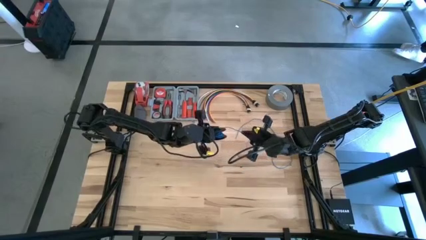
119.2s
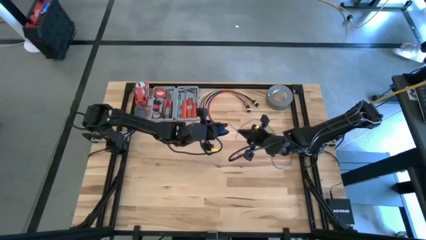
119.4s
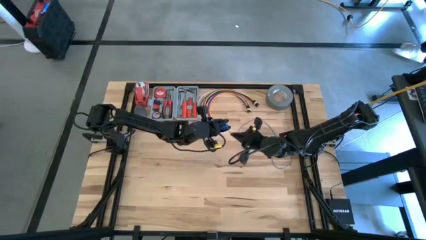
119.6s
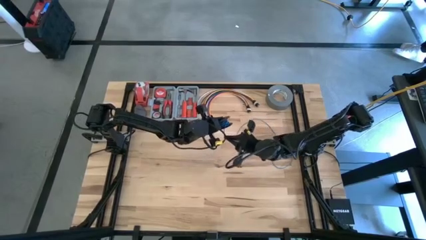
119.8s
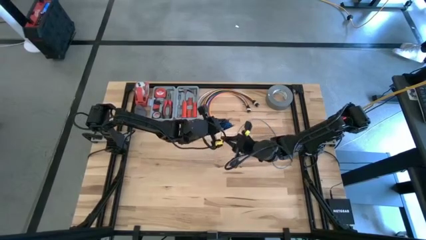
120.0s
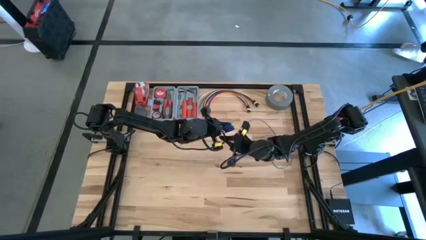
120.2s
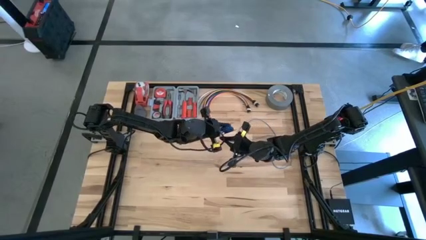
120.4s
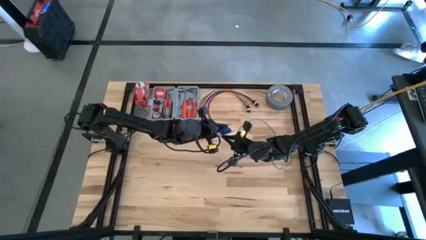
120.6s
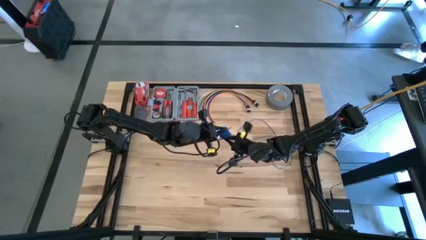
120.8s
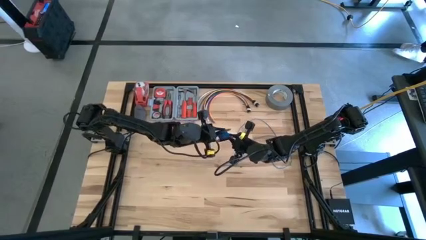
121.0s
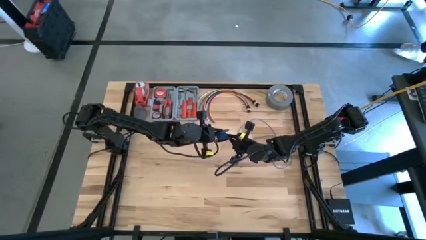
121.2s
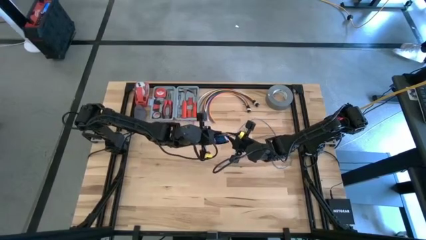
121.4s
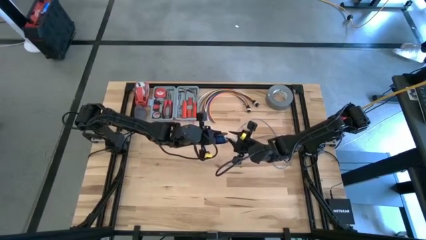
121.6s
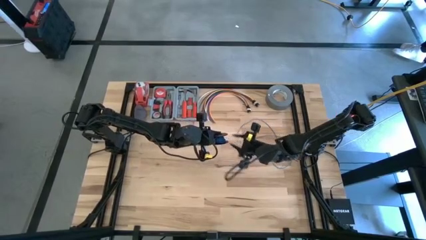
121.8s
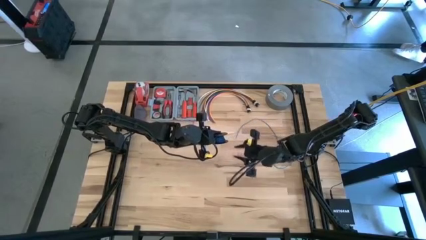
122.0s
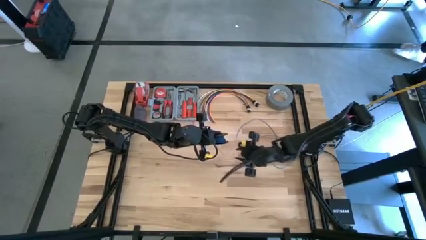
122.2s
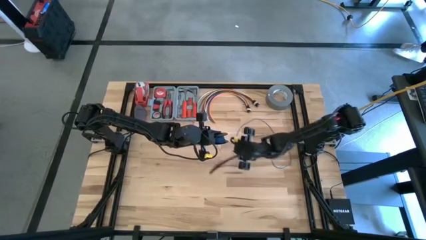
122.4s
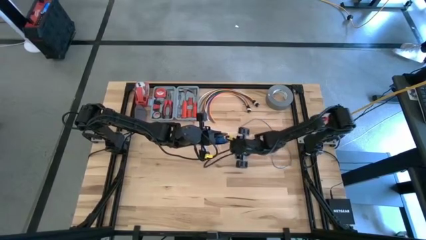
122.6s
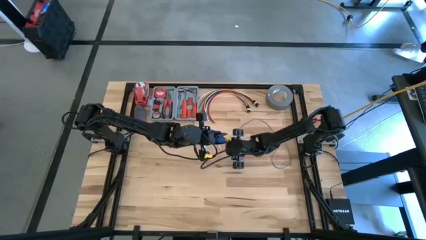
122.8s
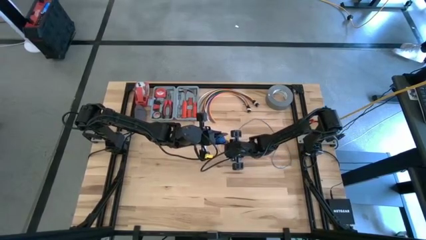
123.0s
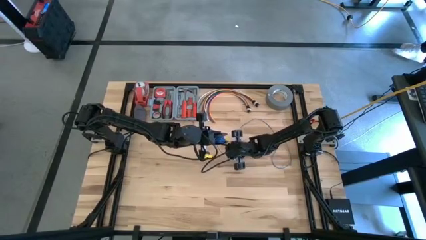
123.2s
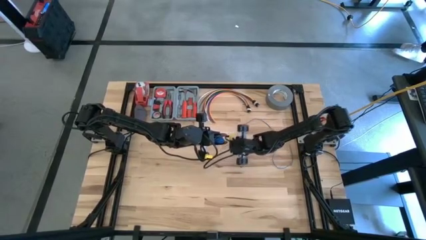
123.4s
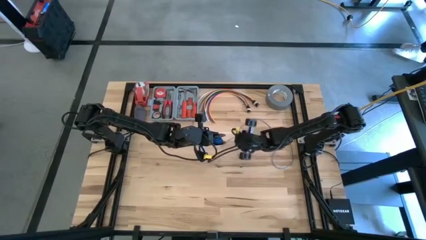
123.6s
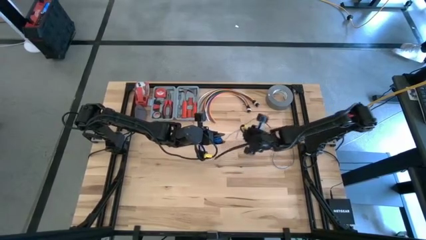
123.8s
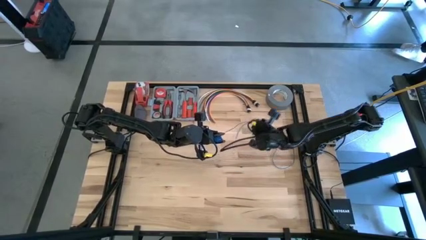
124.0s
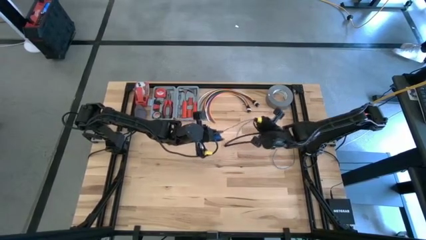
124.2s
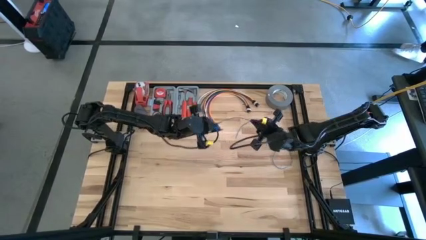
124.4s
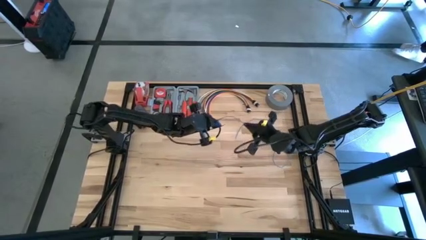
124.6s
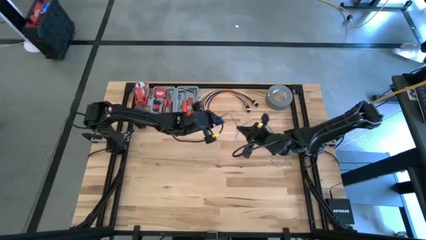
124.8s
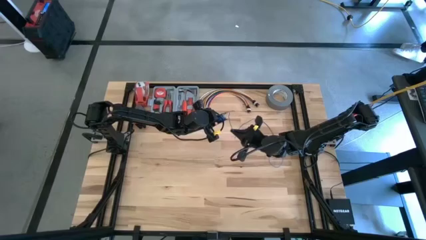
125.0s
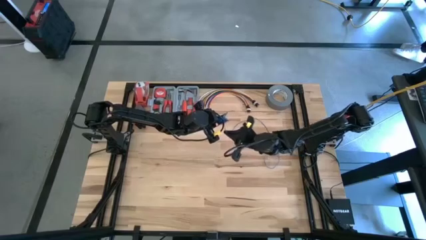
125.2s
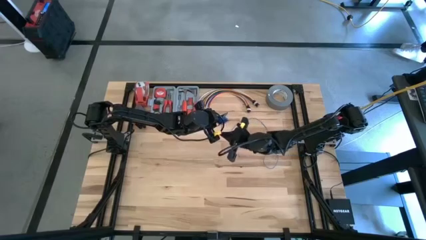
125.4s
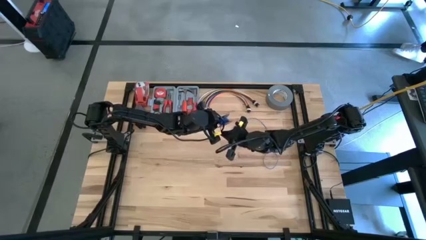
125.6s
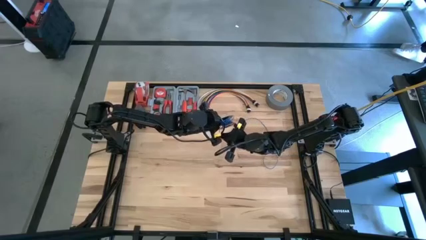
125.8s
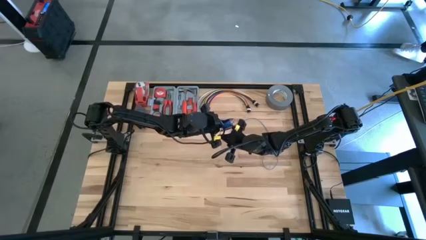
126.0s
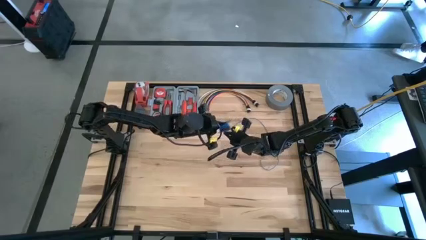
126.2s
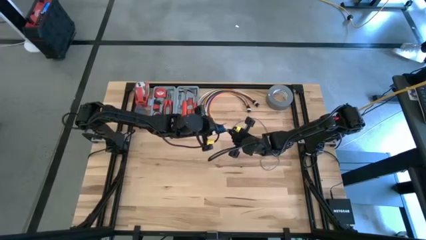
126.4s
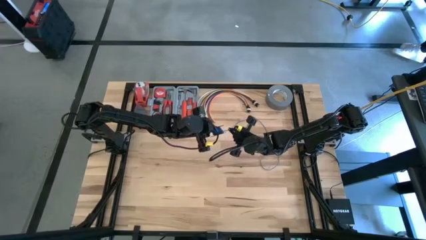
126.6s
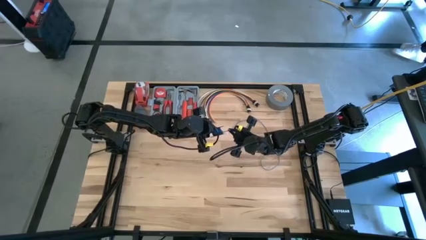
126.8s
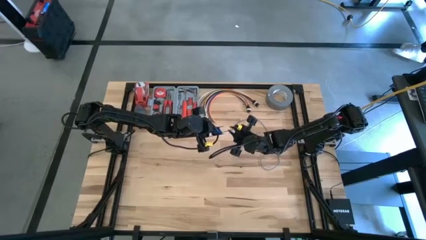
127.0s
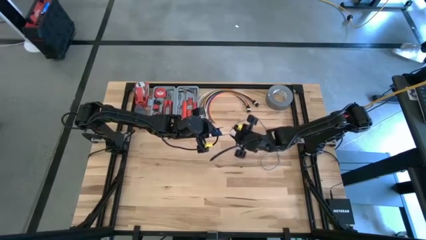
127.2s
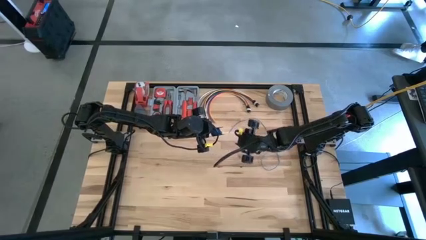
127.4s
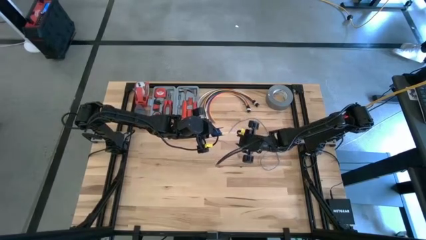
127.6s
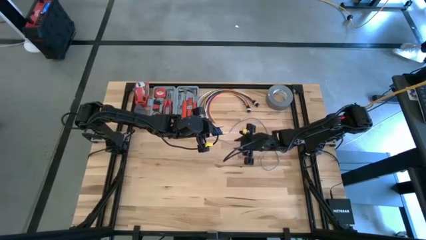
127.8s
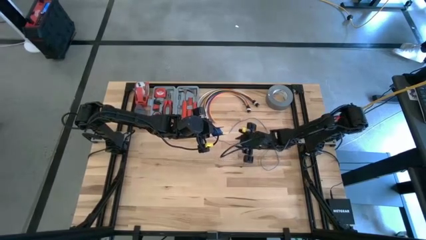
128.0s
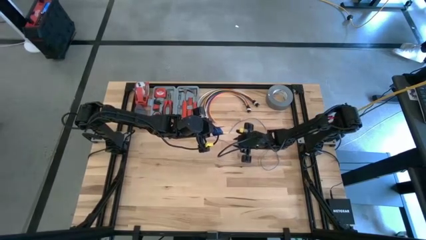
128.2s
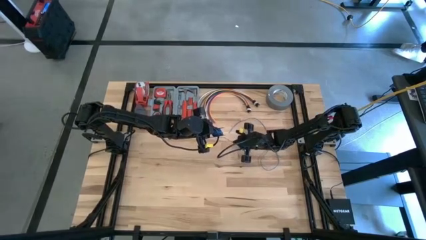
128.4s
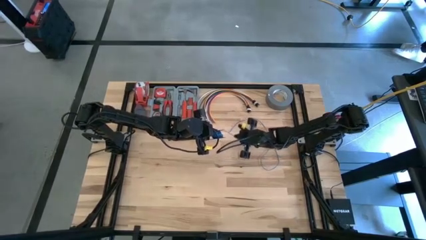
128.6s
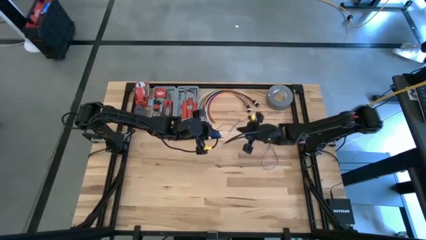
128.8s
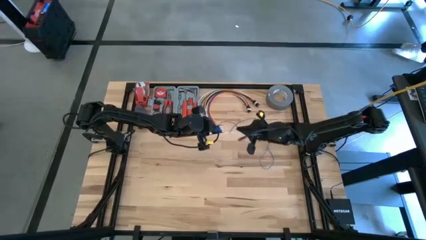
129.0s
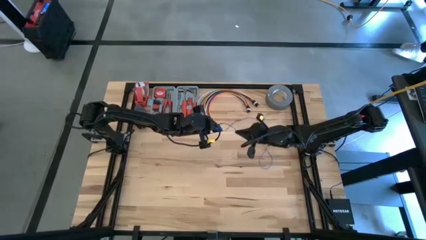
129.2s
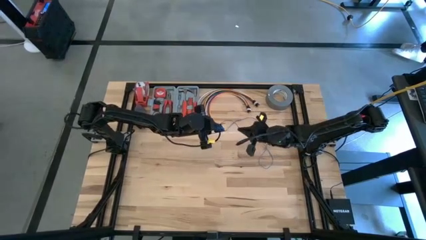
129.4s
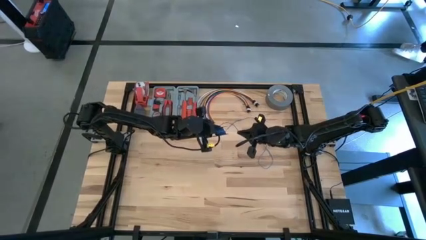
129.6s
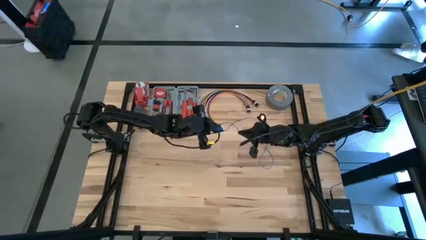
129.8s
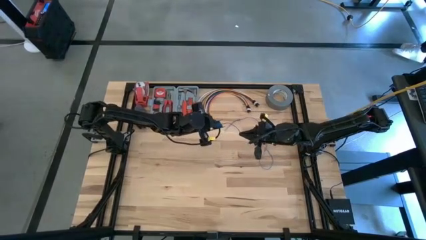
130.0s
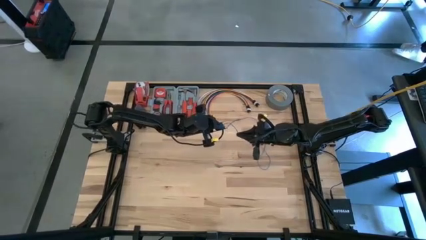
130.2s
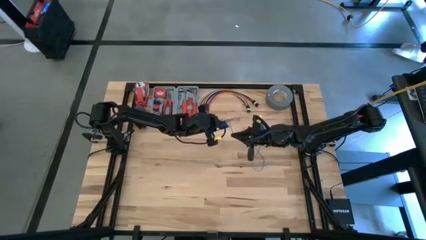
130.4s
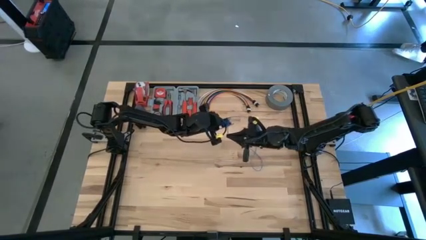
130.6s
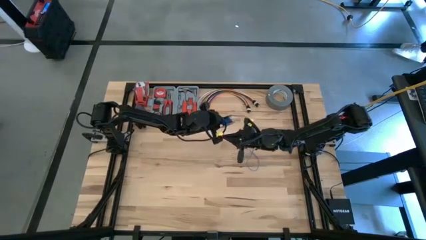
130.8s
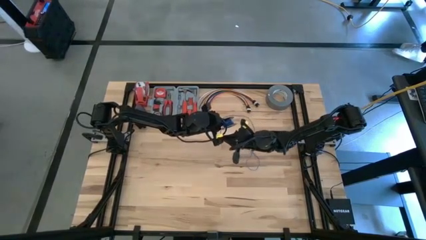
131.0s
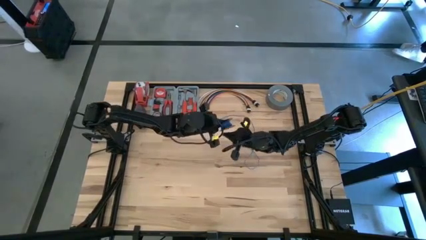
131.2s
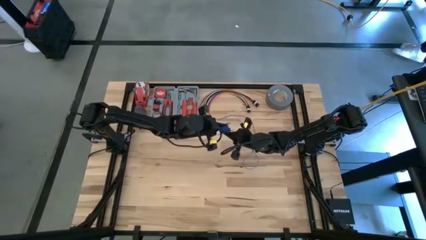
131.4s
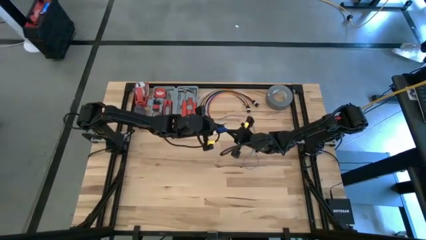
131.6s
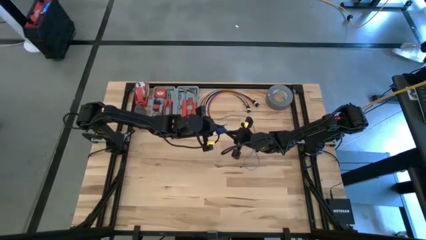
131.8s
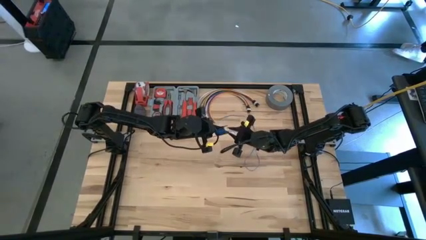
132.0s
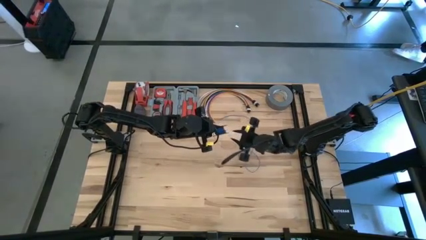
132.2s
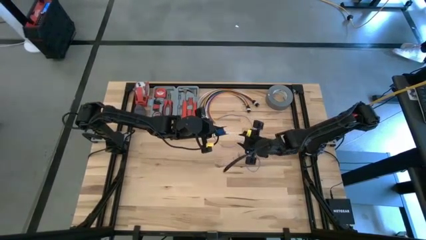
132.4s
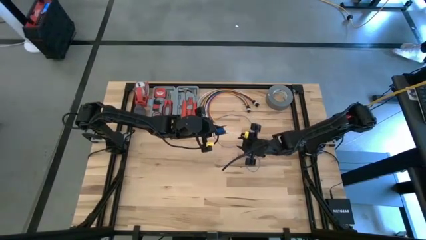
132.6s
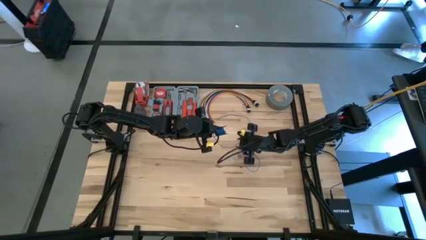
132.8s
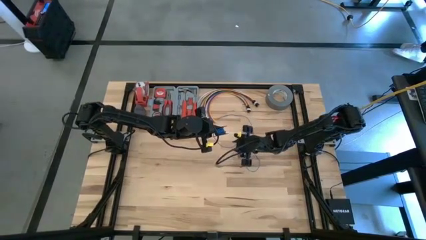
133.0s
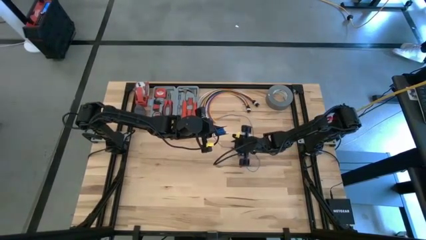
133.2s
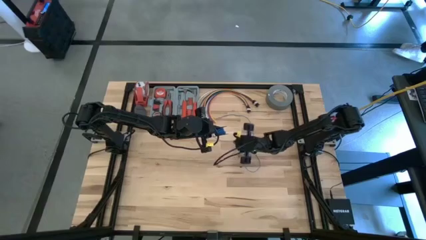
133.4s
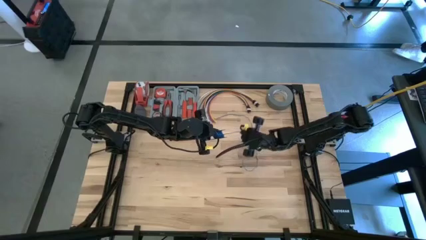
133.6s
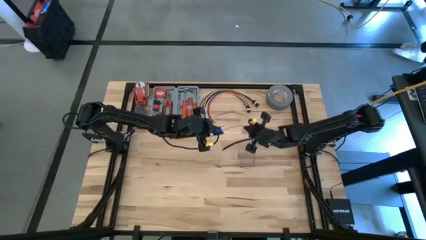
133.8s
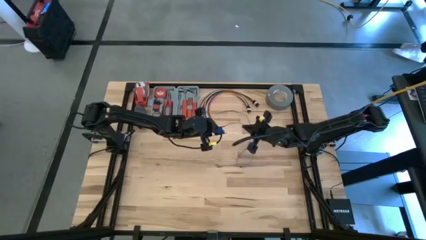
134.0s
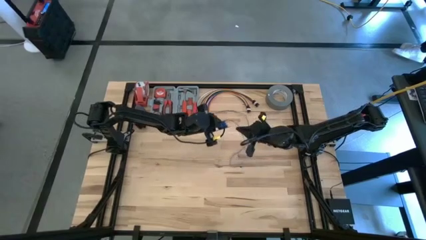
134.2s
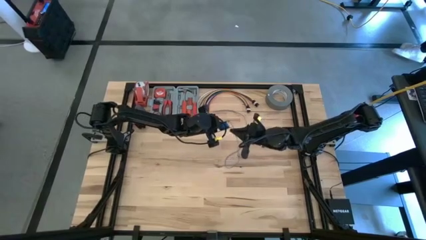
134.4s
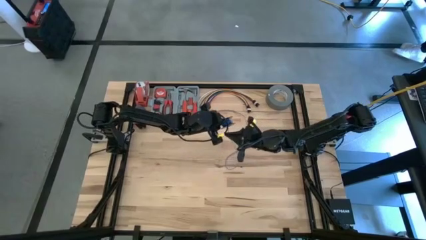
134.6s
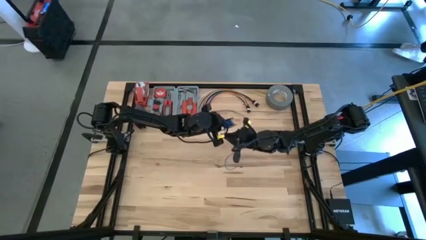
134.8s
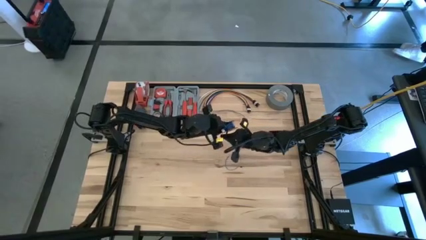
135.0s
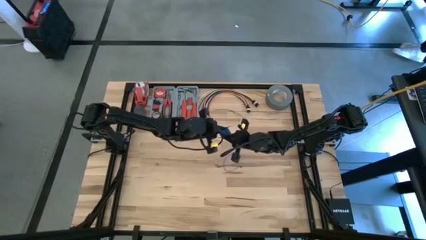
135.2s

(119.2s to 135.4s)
Task: Coil cords
Coil the blue wire onto the black spool
